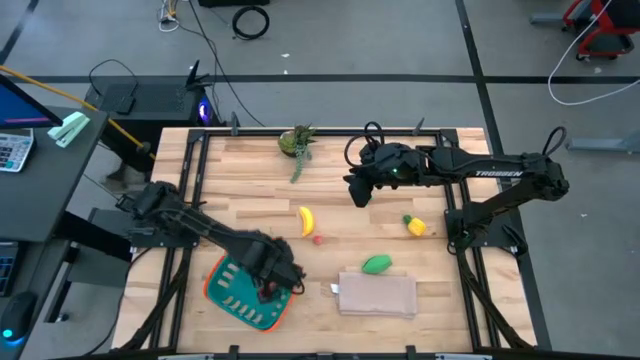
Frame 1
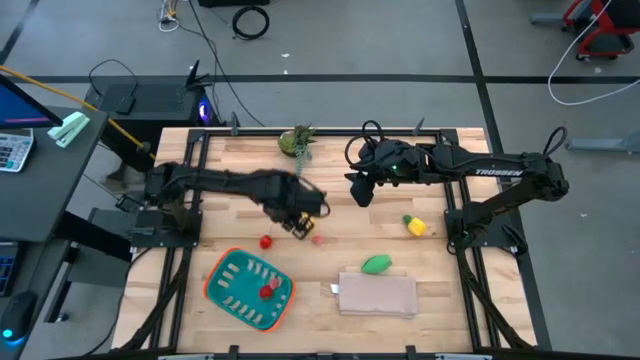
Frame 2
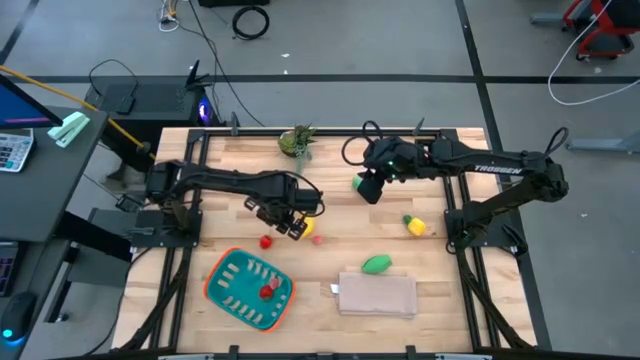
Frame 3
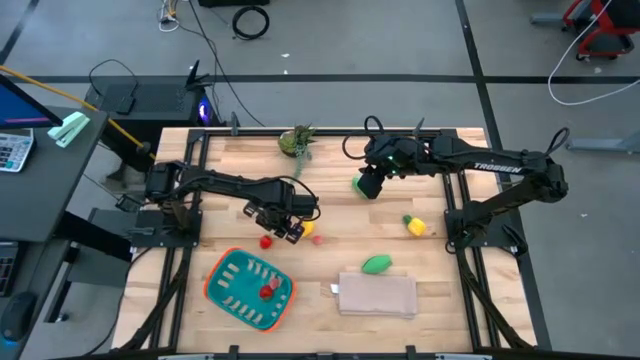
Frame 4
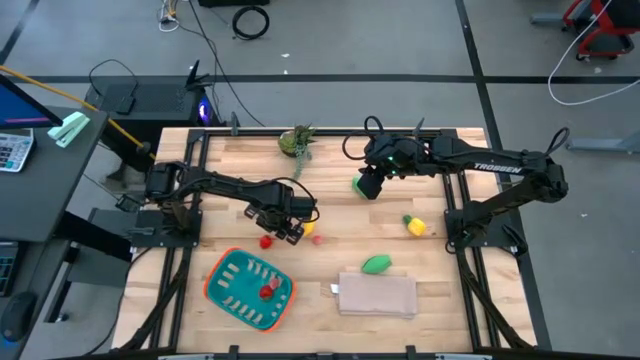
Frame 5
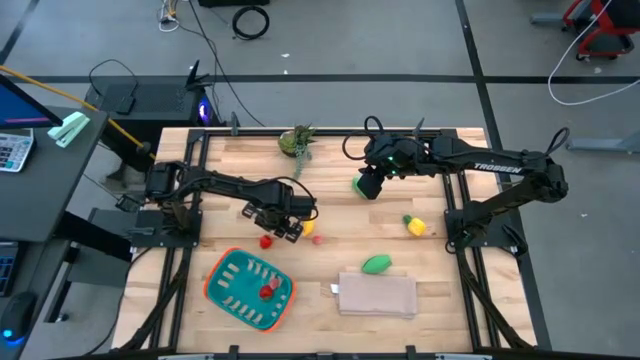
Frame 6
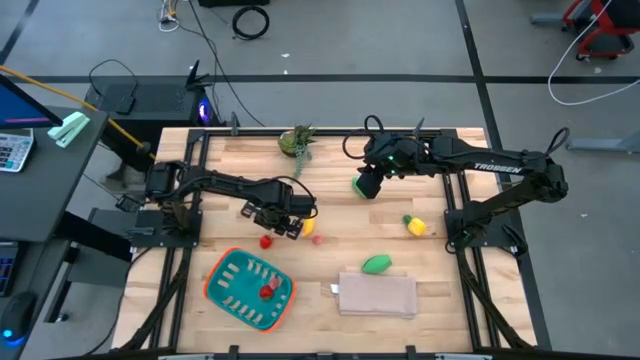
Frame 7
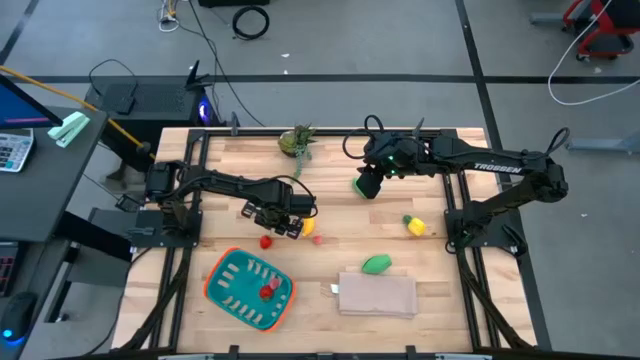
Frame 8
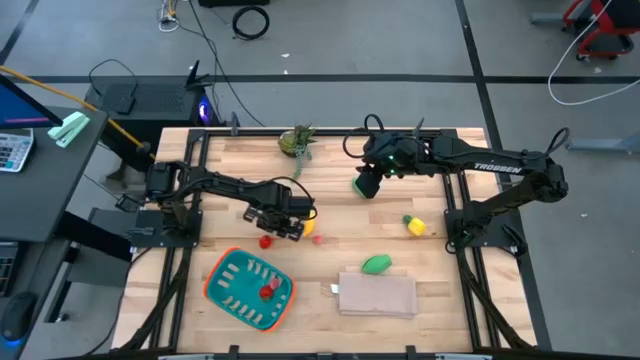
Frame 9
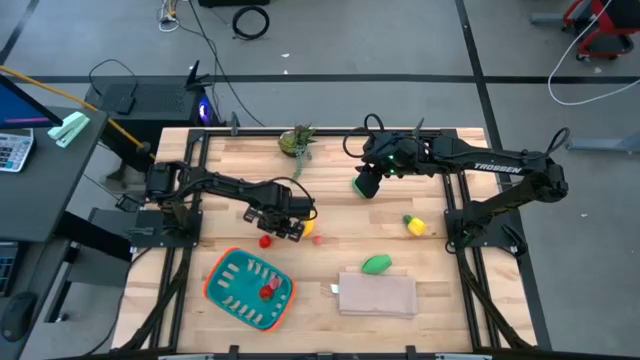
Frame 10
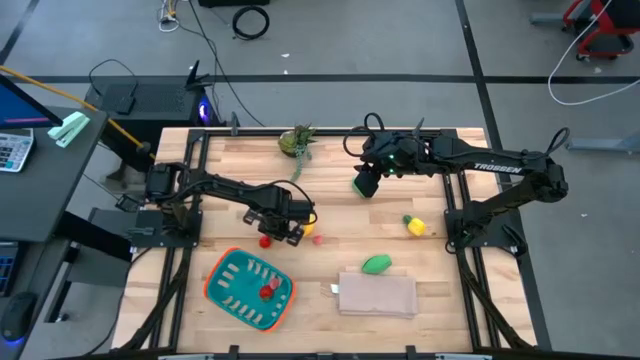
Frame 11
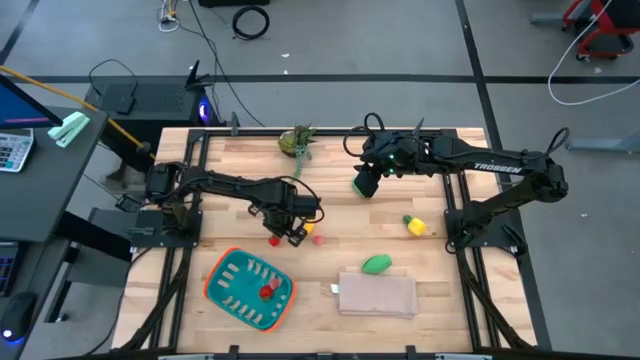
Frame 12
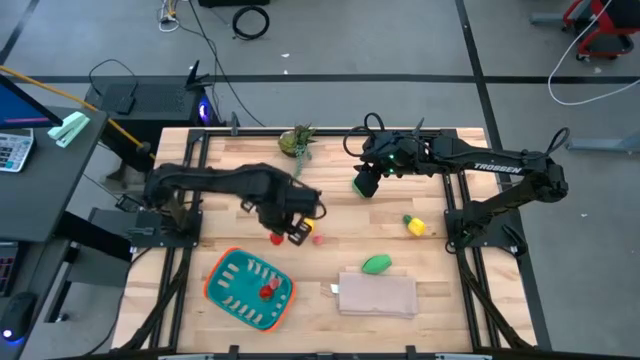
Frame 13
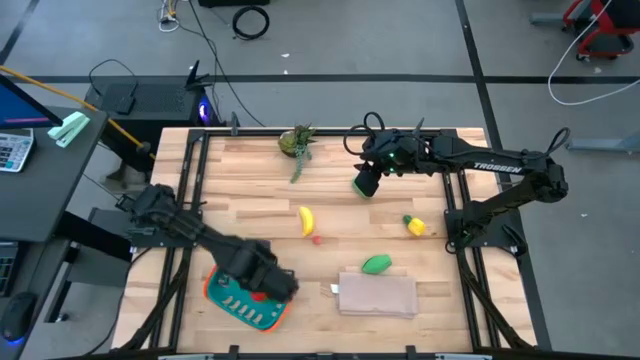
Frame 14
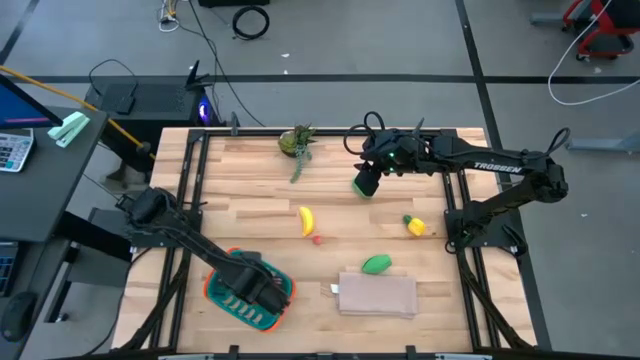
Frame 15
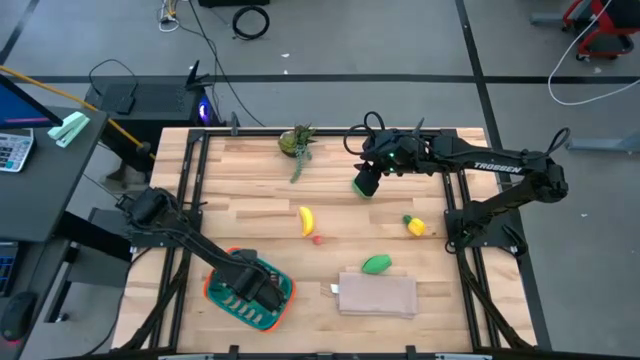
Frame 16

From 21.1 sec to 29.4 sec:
Task: Pick and placing Produce into tupperware
Put the red strawberry into the blue basket

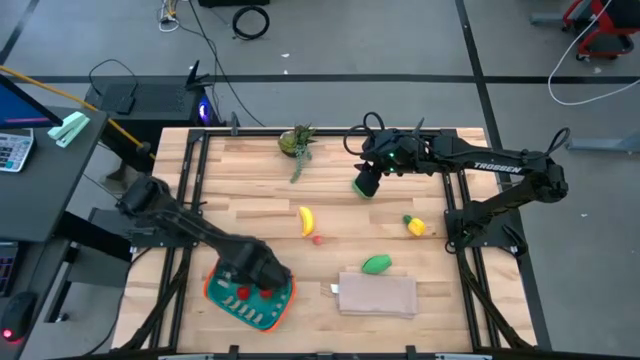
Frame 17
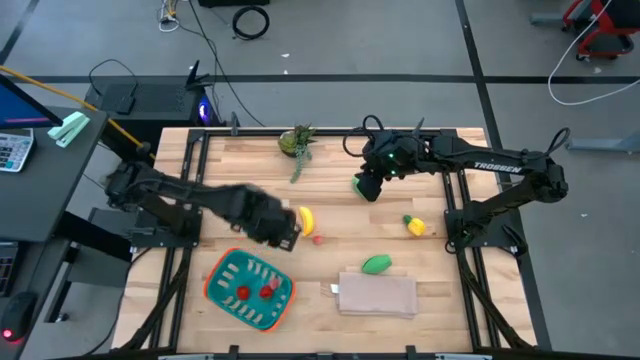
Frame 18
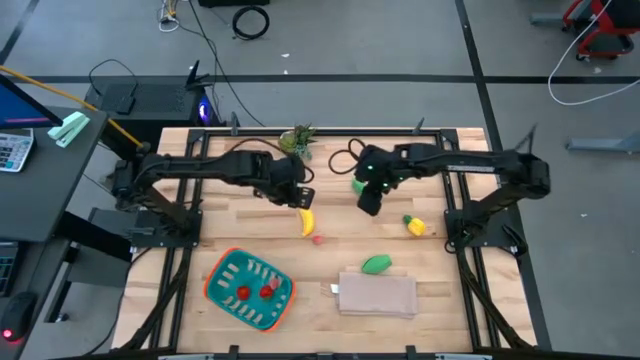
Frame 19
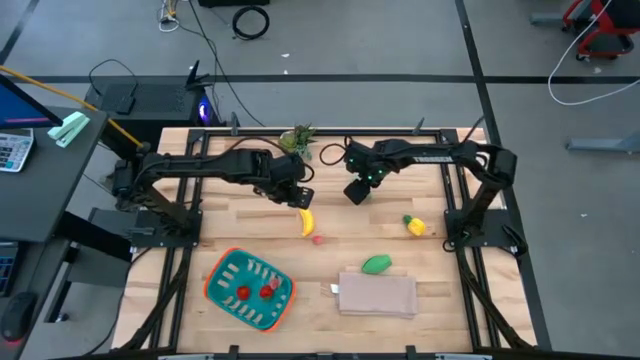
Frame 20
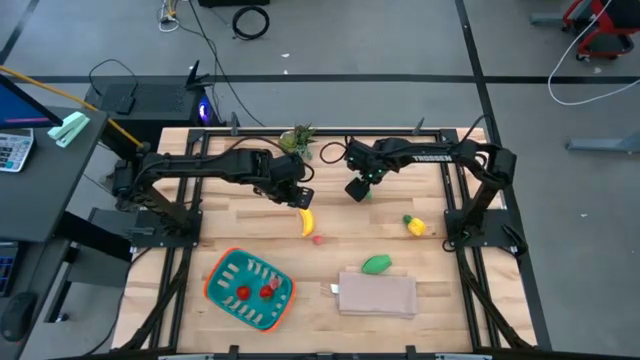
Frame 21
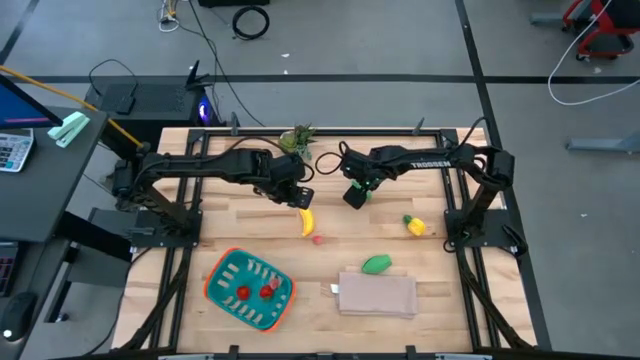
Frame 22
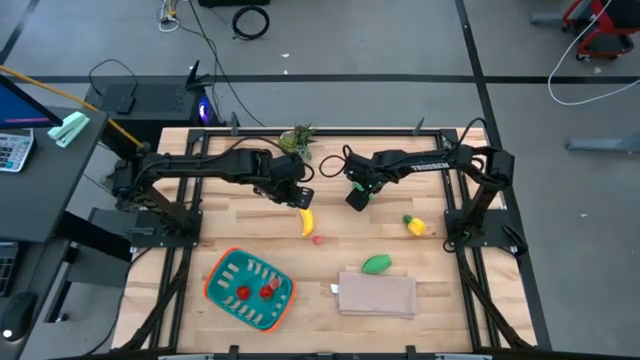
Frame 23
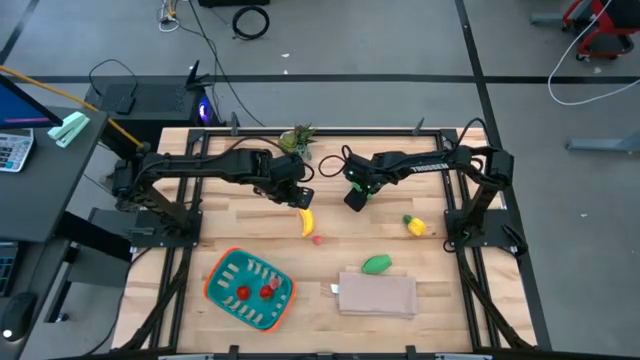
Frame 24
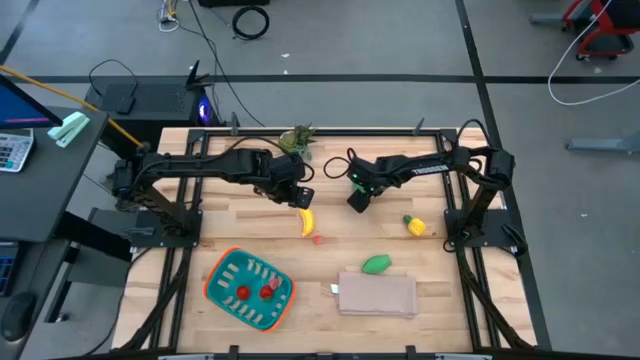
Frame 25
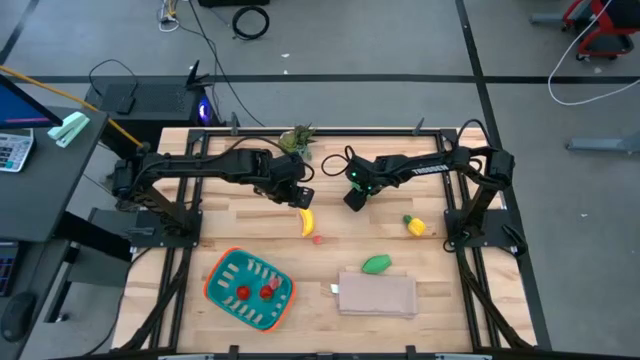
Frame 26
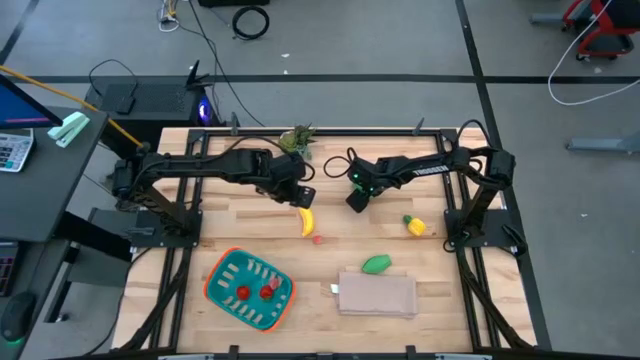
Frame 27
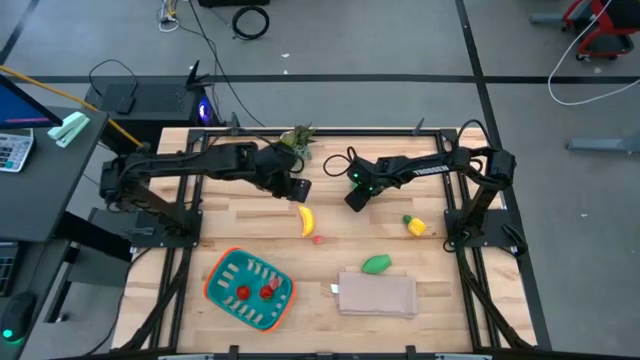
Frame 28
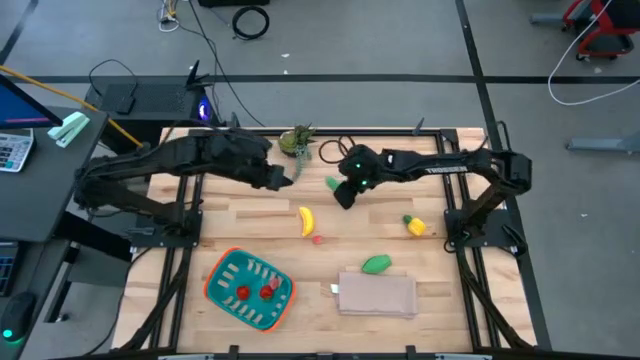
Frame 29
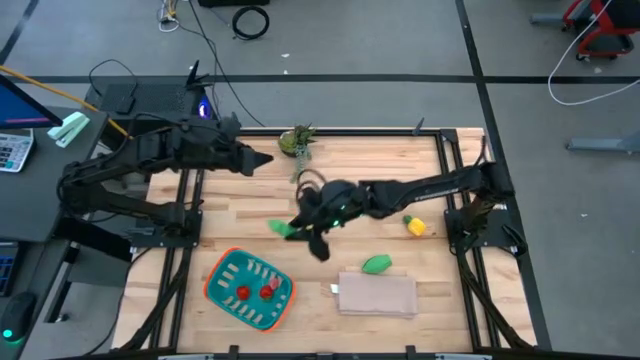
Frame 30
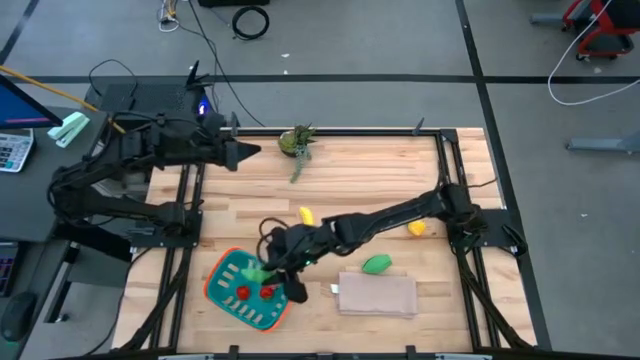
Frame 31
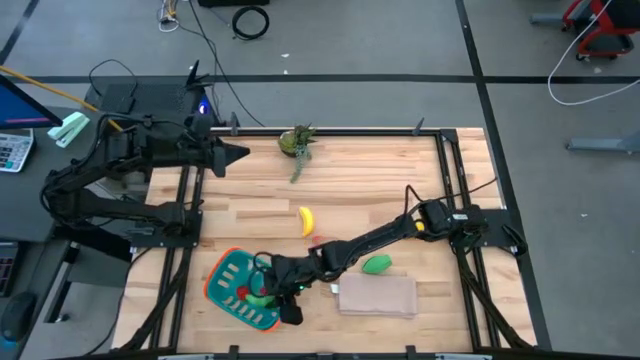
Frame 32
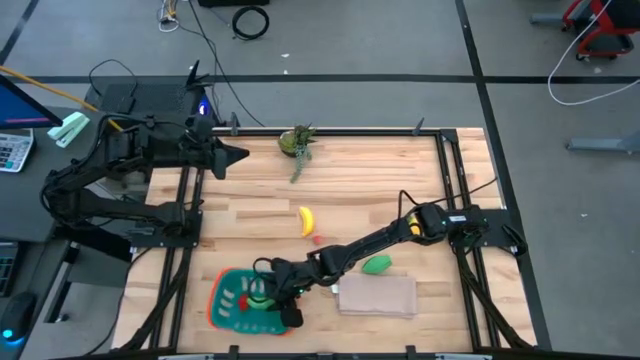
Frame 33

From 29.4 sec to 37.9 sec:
Put the green pea into the blue basket

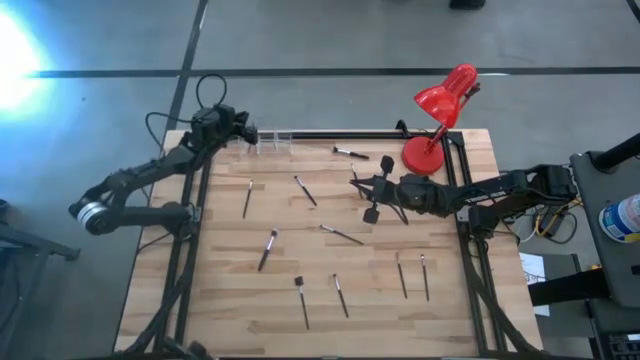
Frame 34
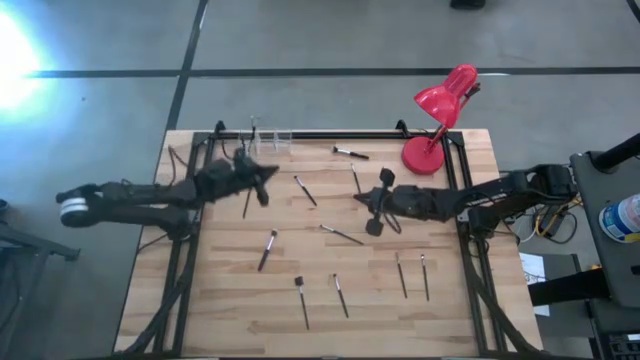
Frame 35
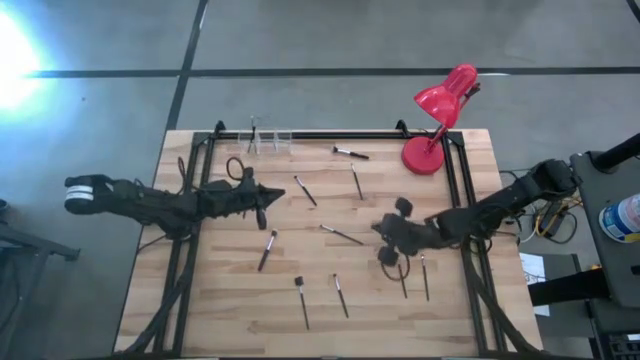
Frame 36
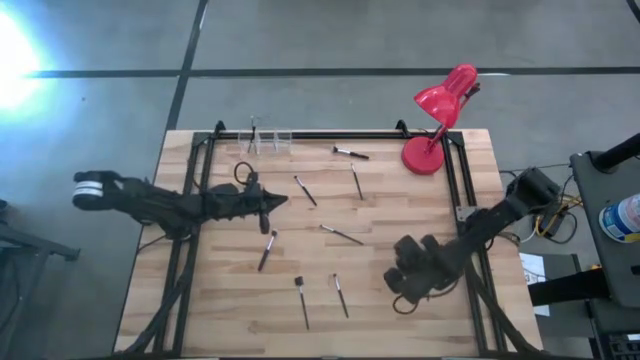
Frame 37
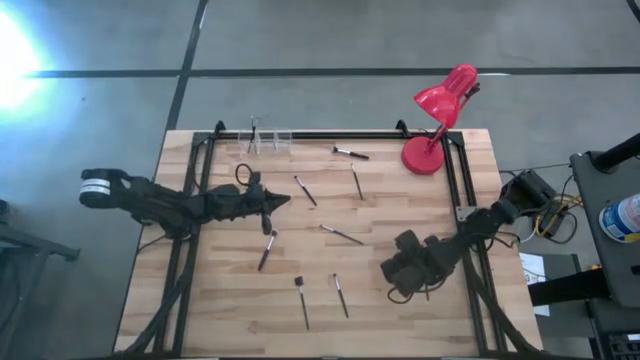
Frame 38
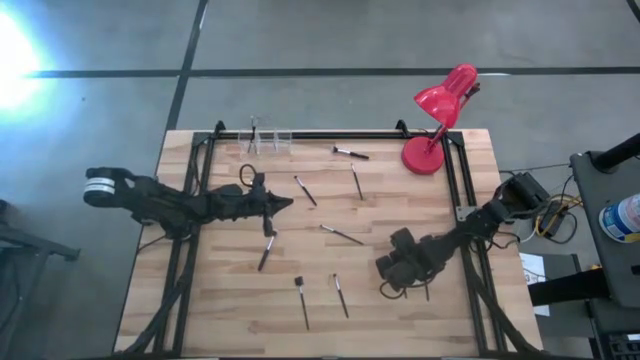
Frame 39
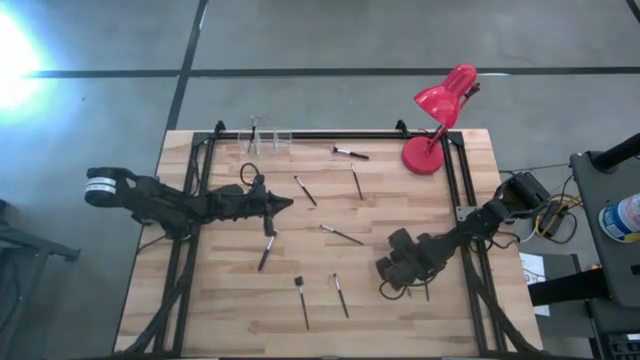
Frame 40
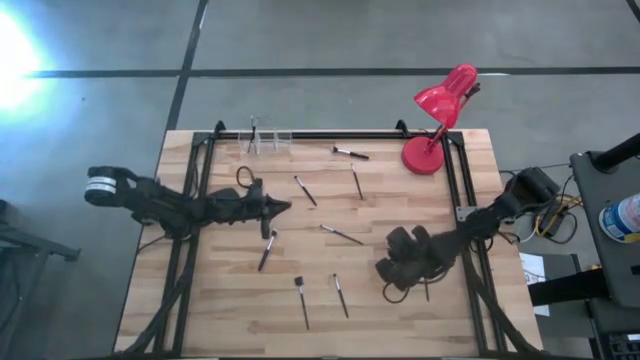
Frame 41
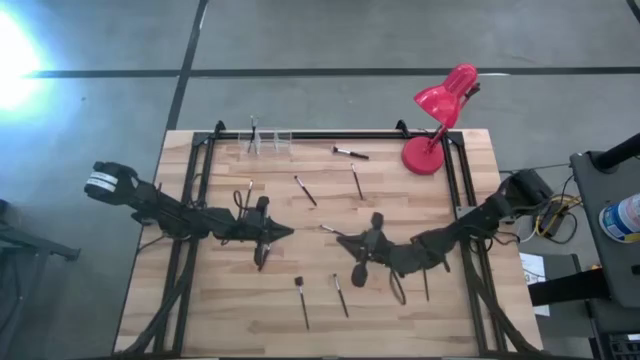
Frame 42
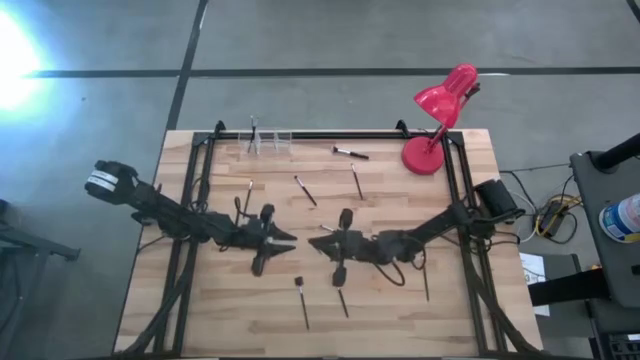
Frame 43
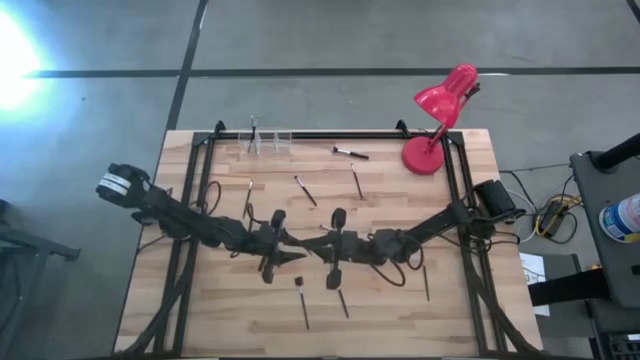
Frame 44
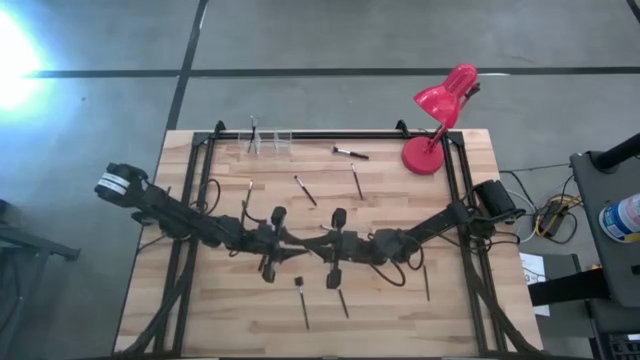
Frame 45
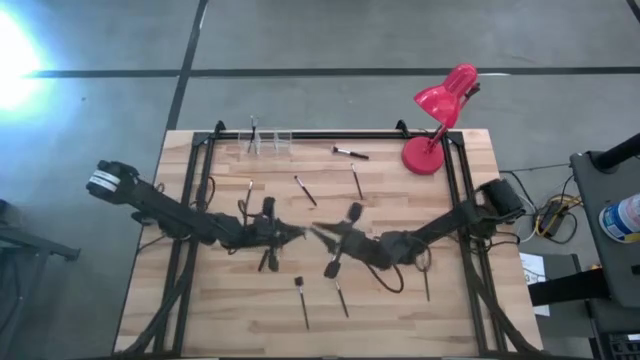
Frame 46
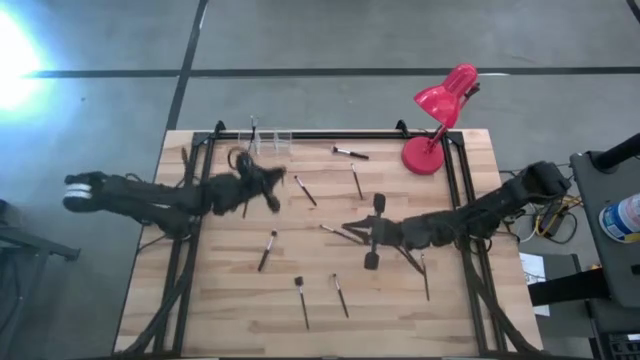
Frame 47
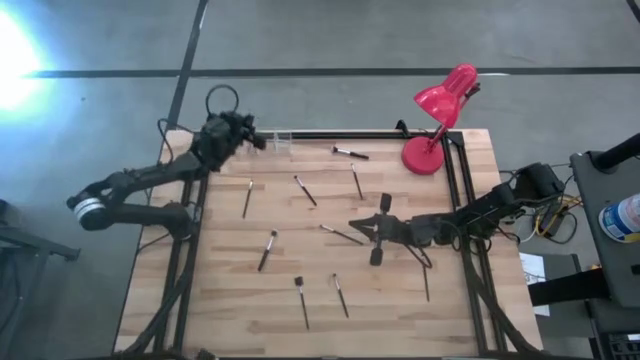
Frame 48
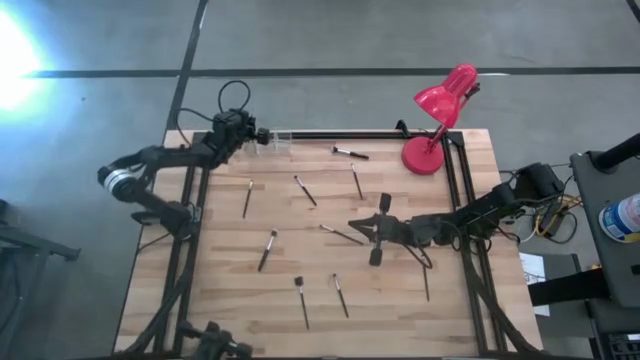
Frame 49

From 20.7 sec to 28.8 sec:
Task: Put items in baskets/containers
Put the black eyeshadow brush into the transparent organizer
